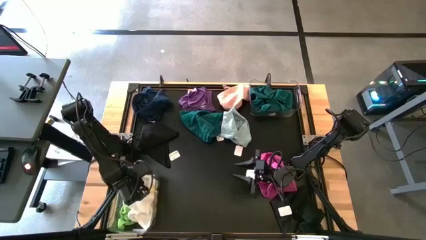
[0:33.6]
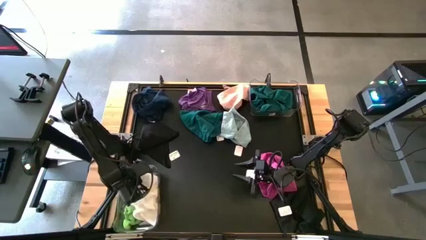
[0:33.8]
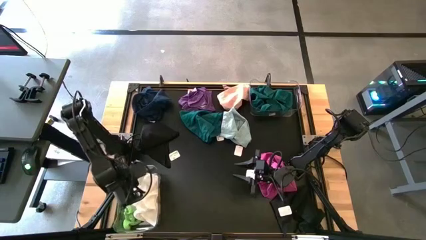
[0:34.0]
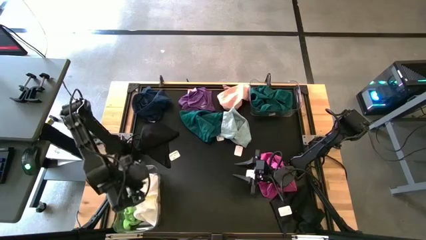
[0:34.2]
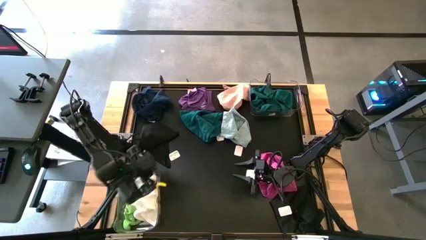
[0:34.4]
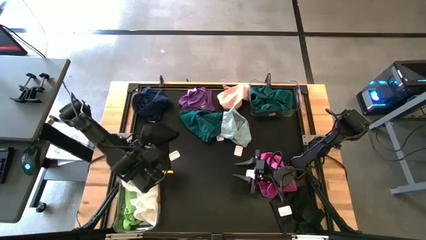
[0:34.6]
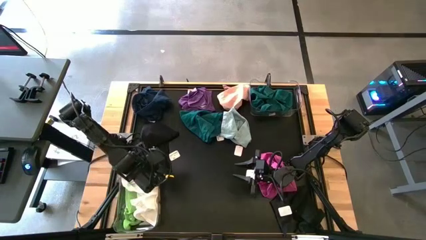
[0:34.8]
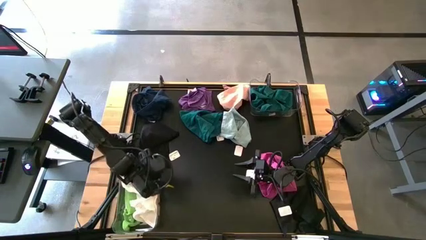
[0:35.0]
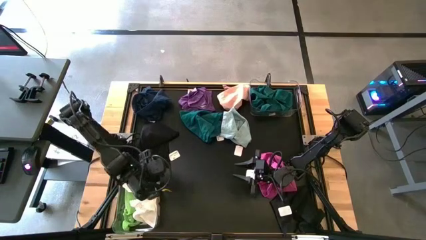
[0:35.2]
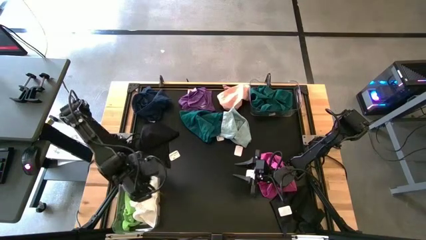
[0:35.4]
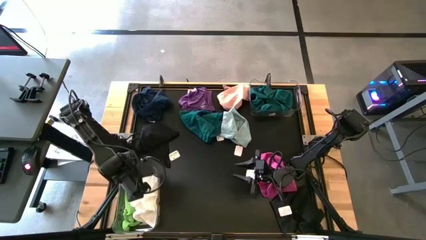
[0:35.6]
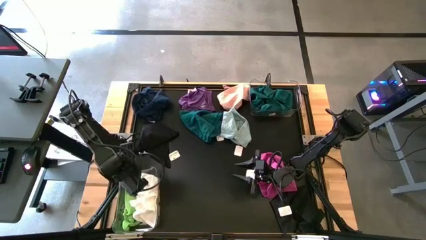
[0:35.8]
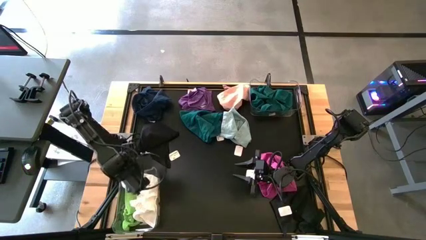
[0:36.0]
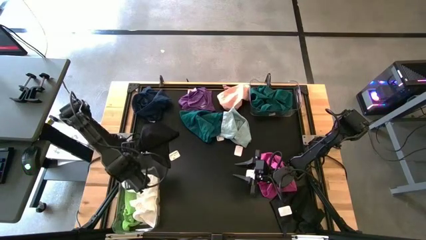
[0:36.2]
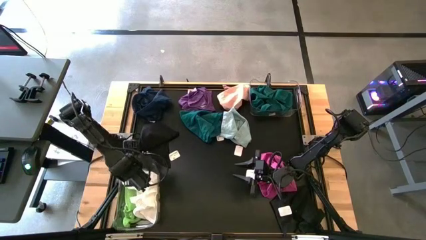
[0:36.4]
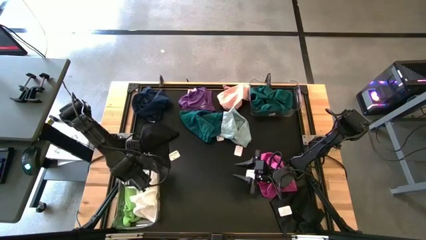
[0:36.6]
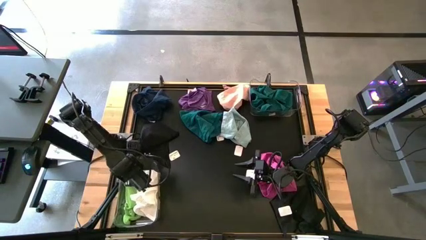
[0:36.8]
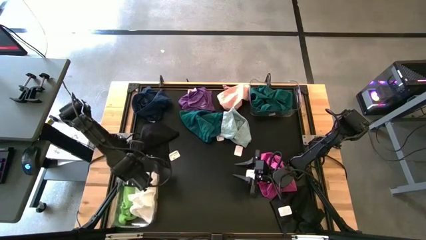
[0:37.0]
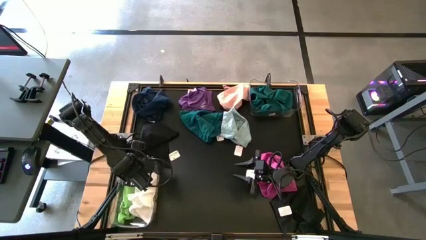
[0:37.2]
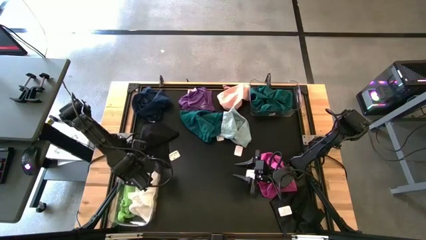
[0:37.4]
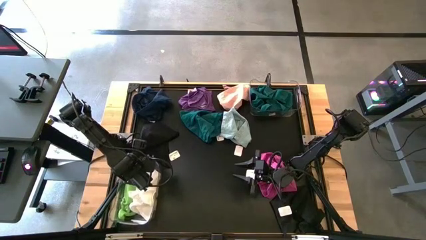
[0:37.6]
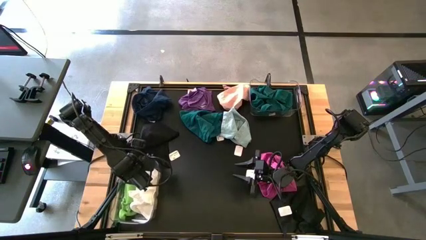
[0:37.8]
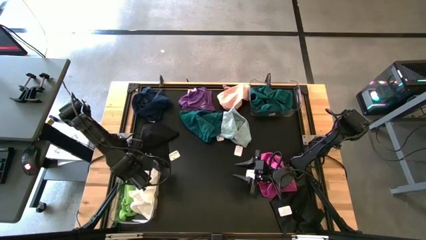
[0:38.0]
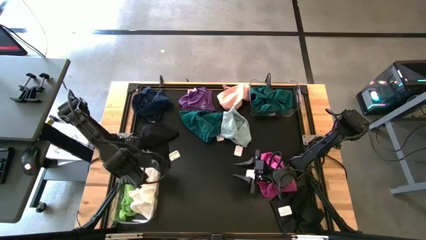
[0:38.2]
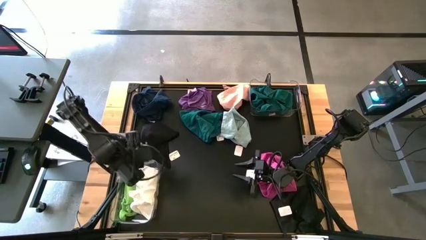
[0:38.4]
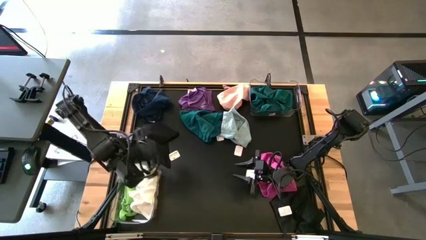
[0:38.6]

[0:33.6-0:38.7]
Task: Sort towels by color in basket
Adjust the bottom transparent bin

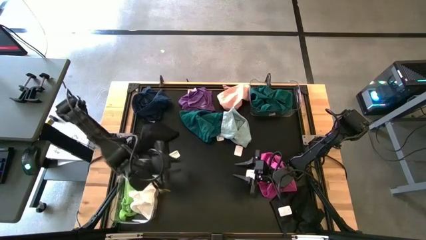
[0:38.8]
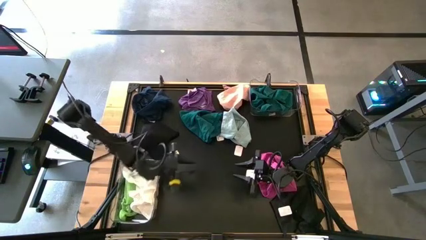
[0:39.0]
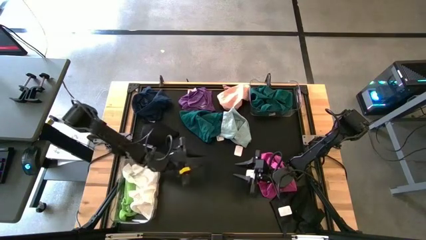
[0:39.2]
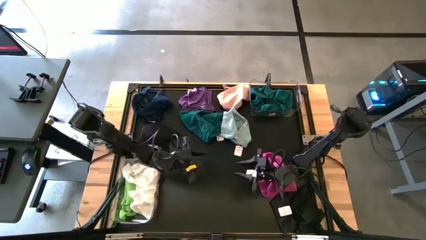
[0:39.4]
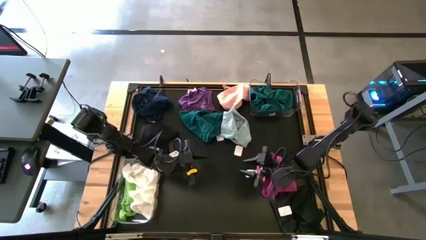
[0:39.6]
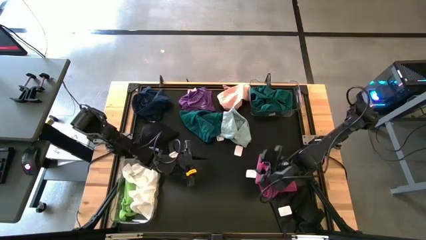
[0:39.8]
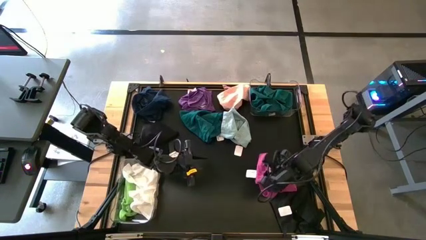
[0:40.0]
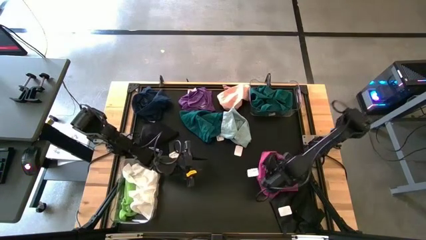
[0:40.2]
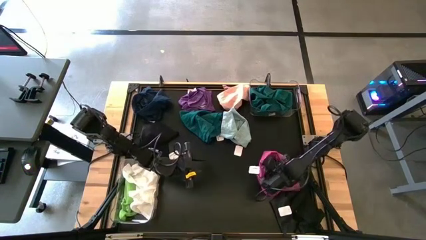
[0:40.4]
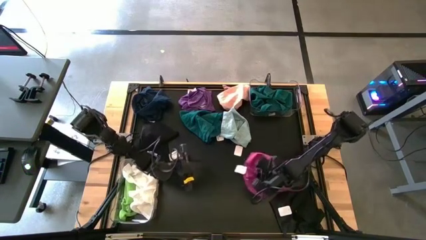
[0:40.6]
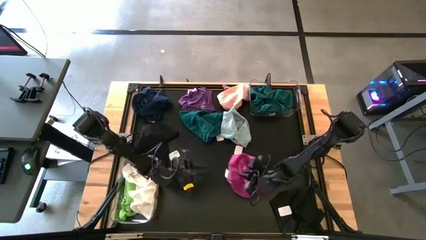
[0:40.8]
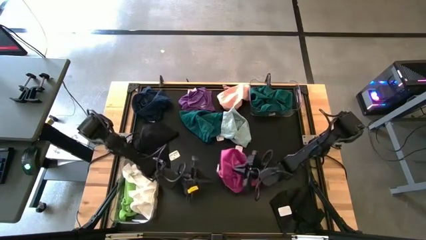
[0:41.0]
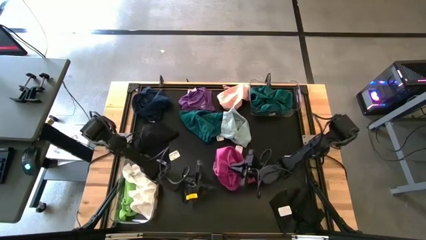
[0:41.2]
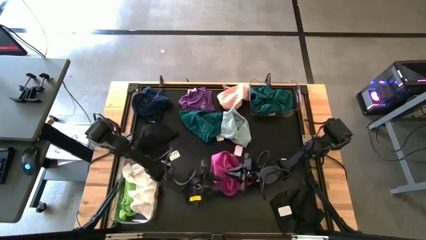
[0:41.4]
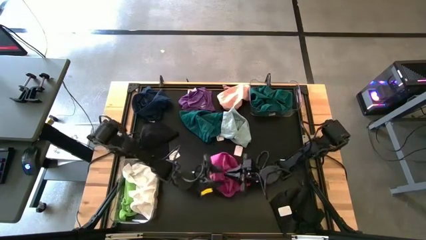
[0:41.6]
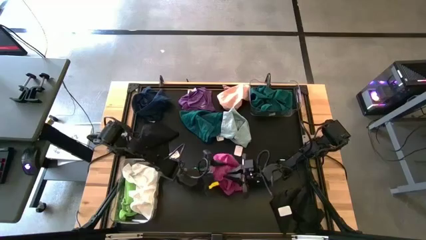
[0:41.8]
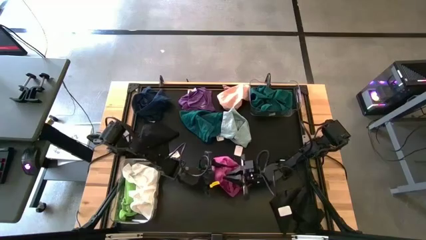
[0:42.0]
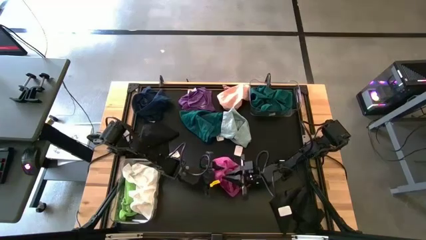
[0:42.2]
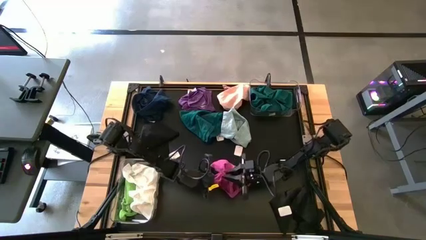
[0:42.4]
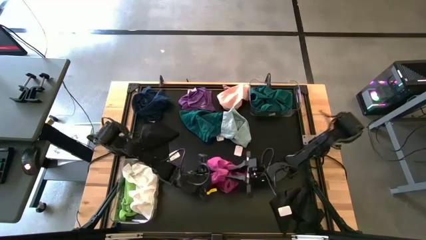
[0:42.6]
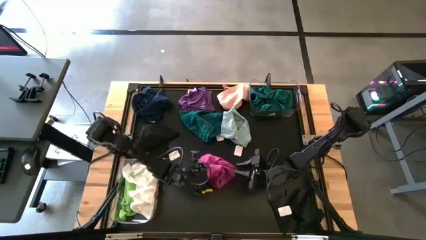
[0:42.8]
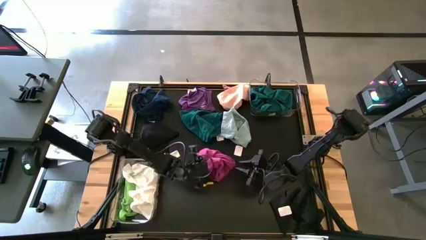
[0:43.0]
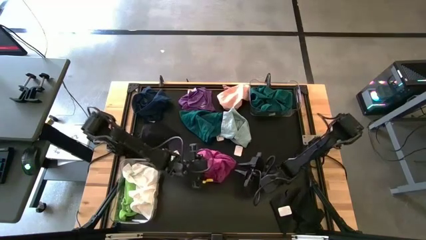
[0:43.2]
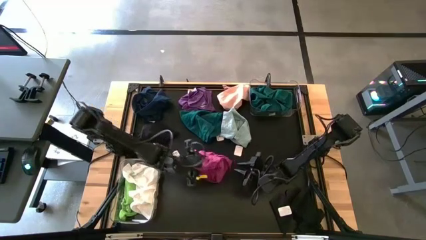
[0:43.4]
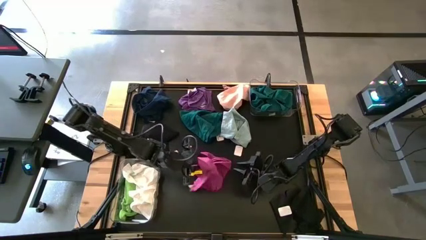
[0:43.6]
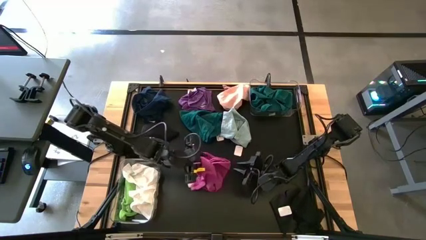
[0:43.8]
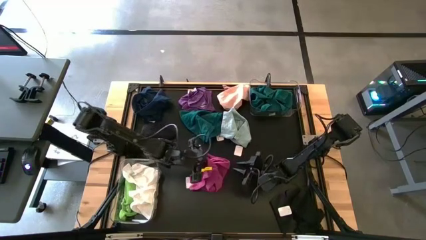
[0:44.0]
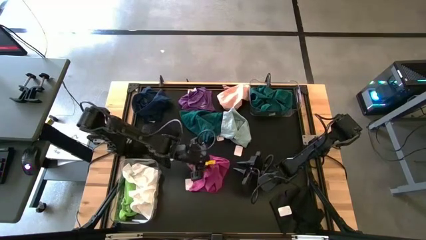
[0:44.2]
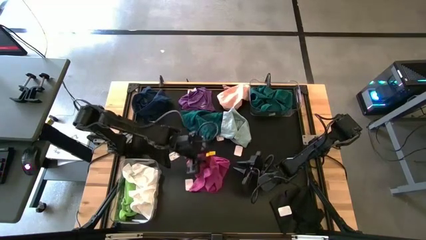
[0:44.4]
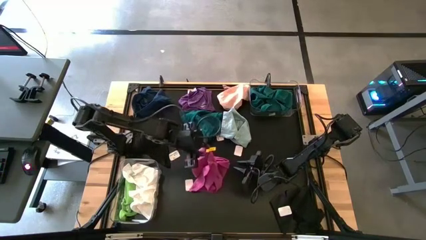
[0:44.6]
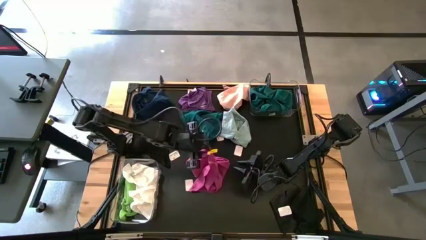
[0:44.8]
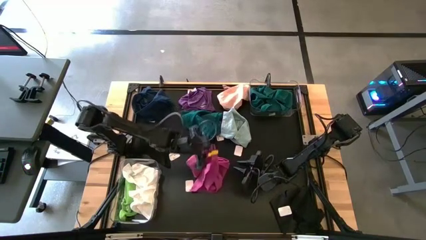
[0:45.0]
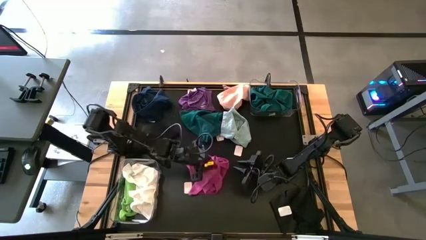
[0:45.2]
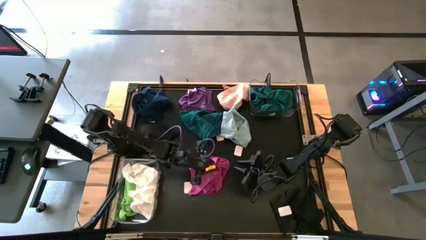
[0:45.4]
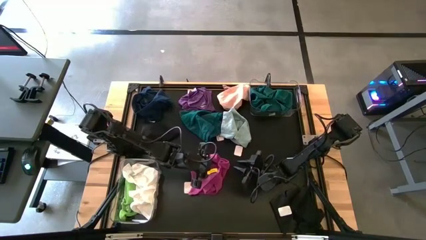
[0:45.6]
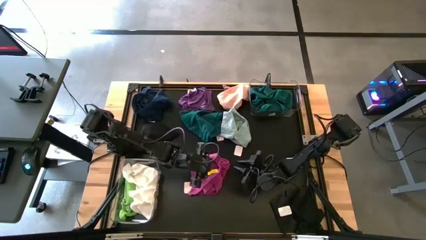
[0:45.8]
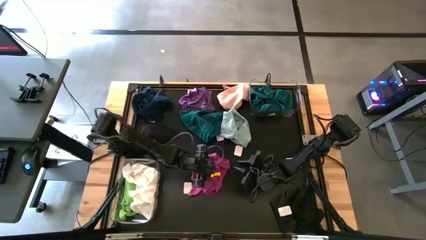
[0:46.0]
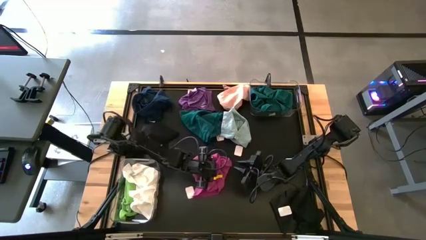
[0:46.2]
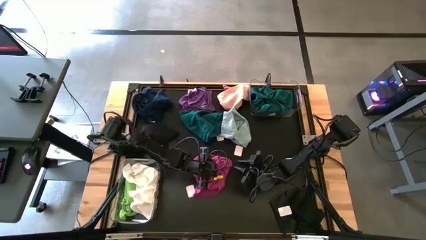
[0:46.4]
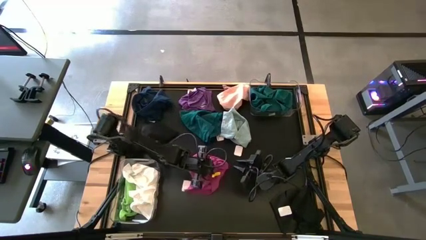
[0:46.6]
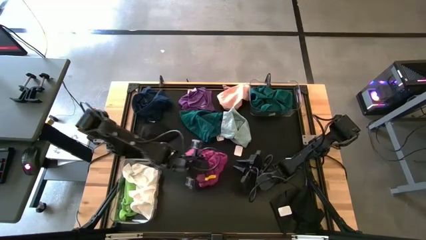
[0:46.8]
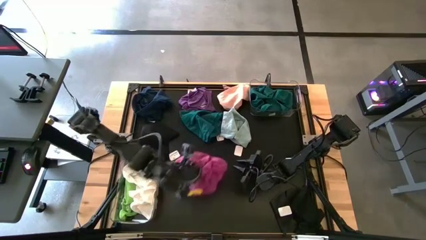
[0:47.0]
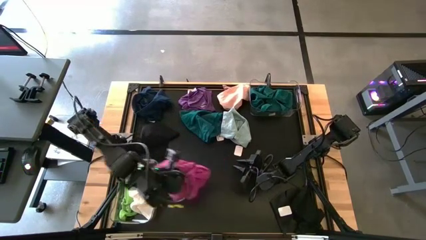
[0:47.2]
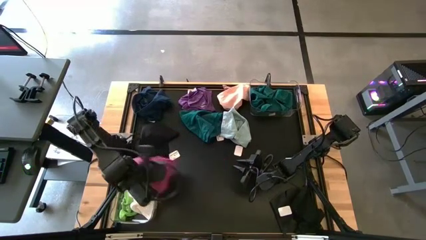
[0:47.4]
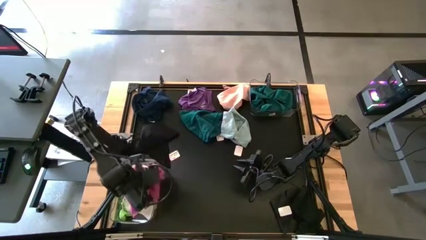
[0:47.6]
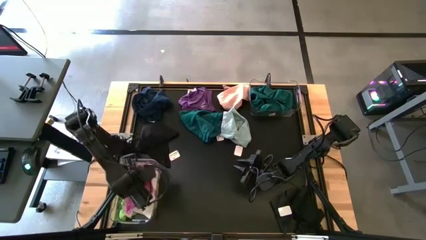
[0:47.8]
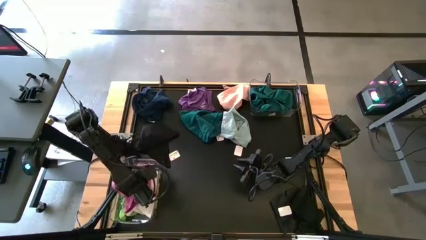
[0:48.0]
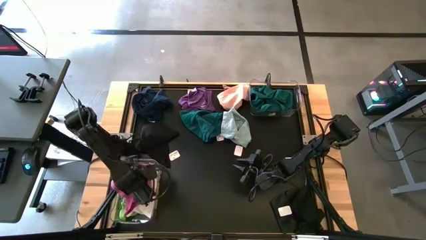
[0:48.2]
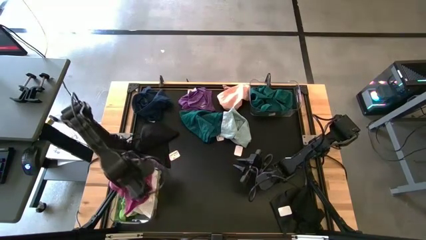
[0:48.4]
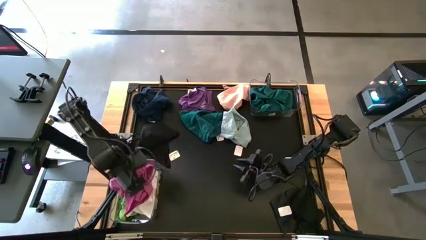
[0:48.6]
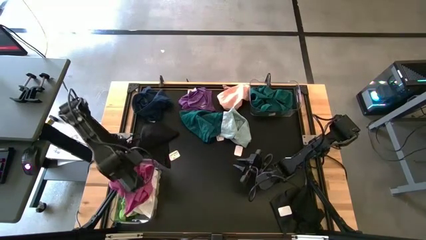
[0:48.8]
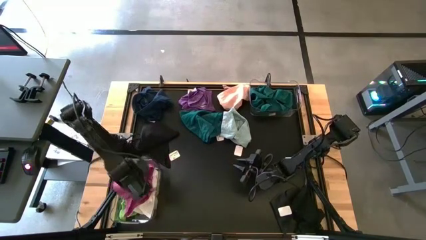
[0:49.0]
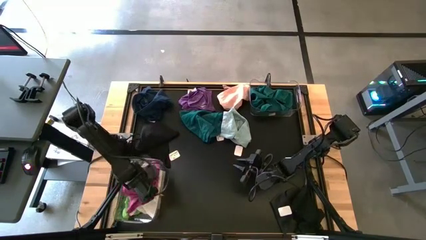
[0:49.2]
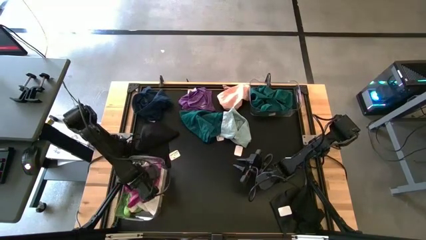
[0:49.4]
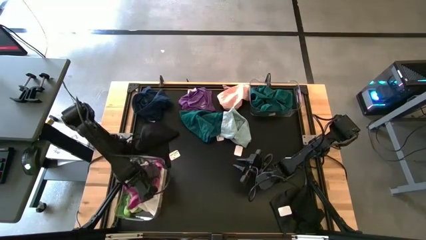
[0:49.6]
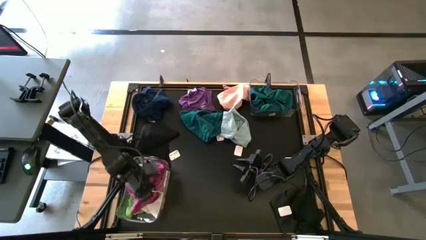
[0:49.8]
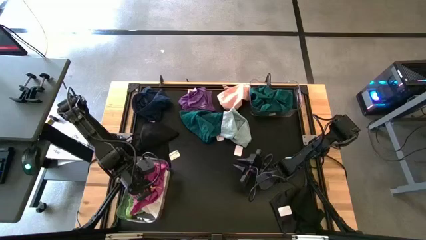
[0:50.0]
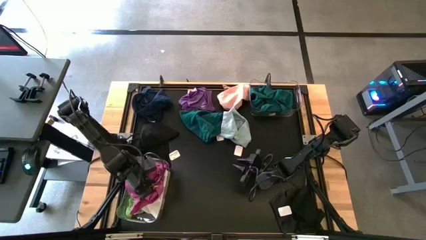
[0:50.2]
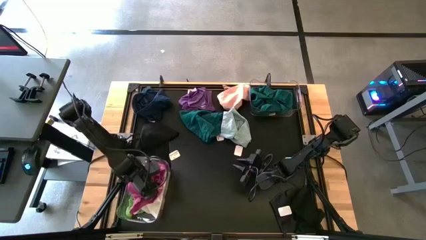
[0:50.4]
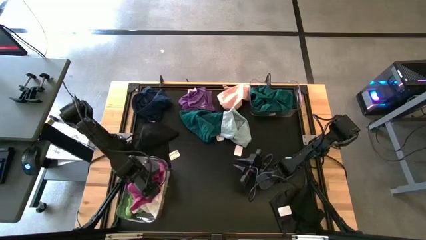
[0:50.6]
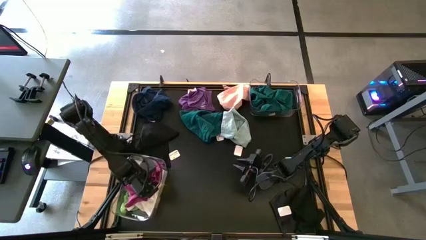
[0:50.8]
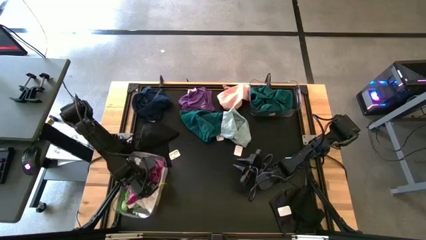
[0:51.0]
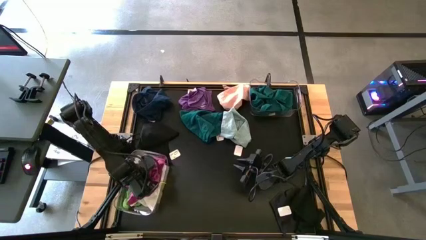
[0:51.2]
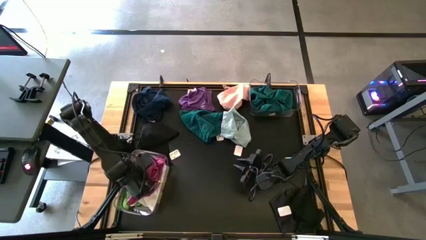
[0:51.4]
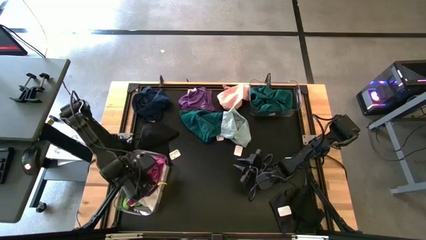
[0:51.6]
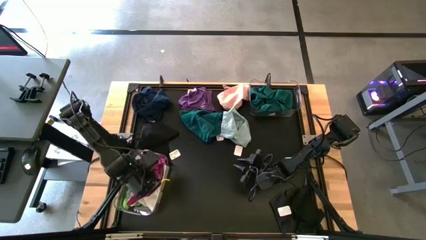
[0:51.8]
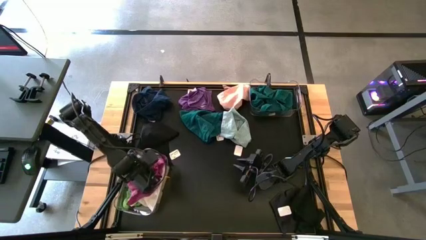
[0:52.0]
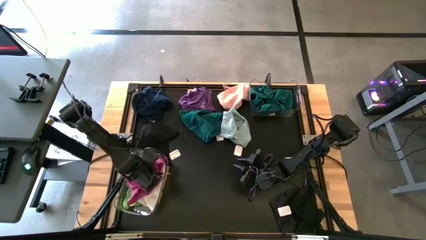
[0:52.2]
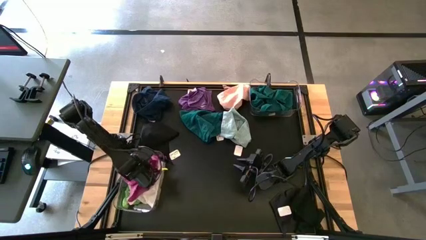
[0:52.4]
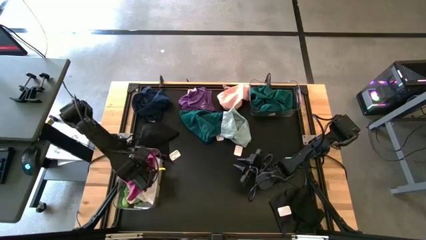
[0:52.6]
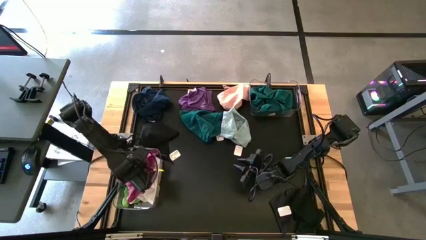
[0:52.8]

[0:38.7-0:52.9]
Put the pink towel into the bottom transparent bin
